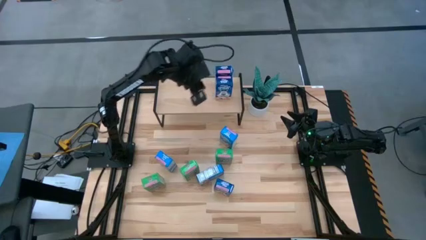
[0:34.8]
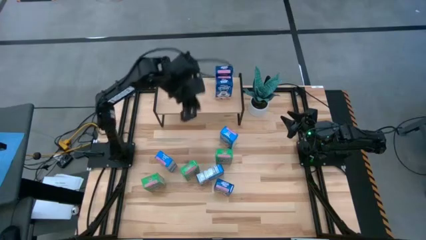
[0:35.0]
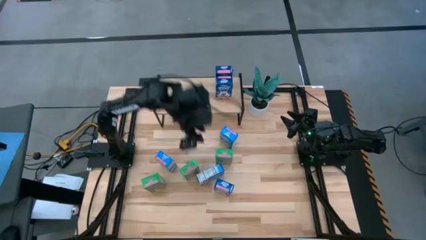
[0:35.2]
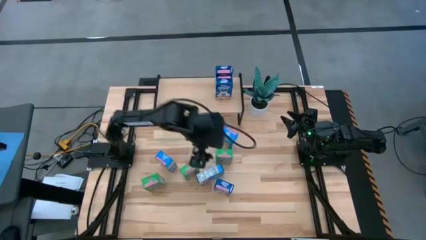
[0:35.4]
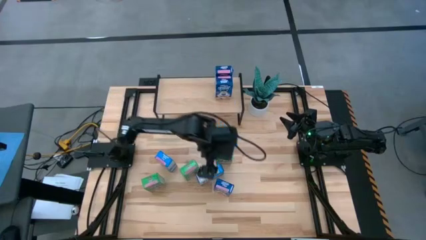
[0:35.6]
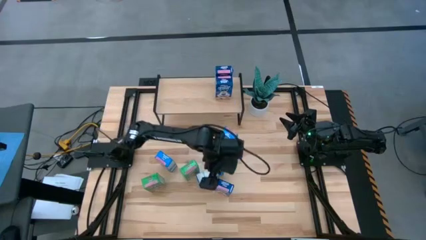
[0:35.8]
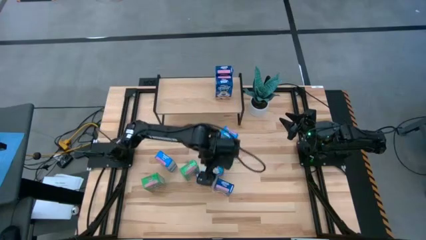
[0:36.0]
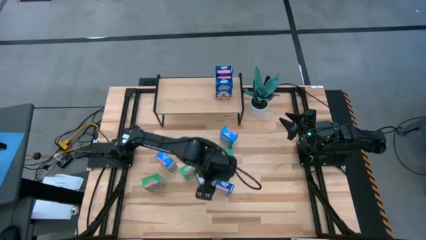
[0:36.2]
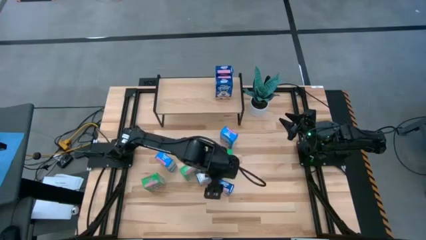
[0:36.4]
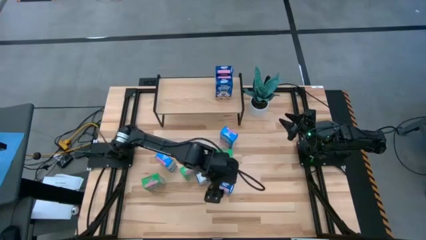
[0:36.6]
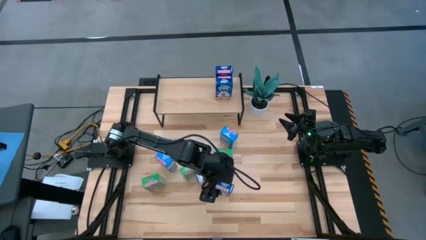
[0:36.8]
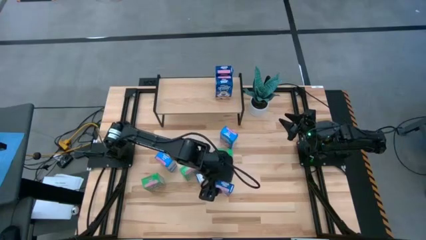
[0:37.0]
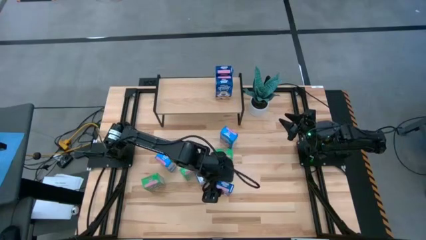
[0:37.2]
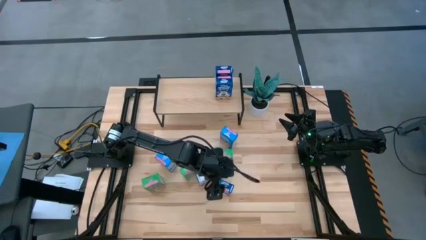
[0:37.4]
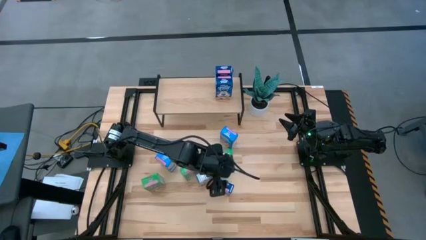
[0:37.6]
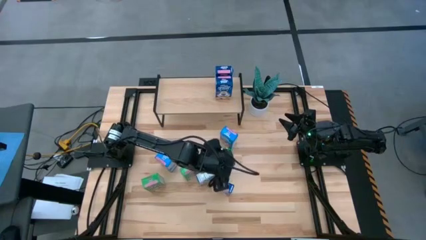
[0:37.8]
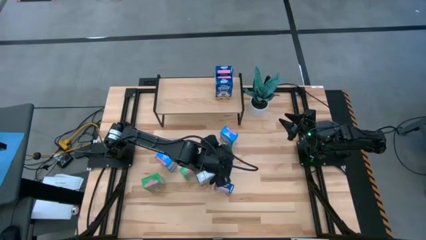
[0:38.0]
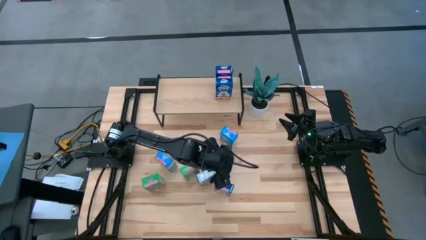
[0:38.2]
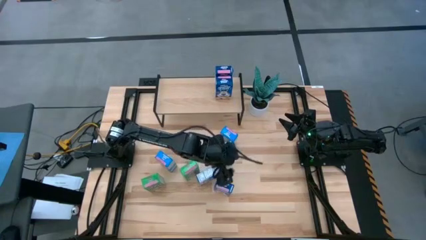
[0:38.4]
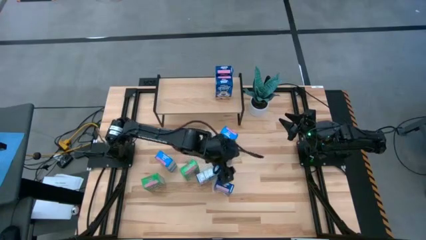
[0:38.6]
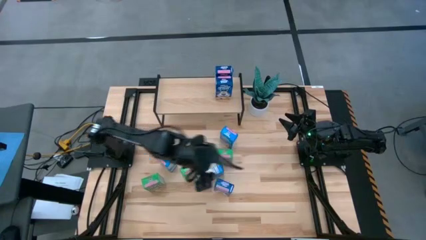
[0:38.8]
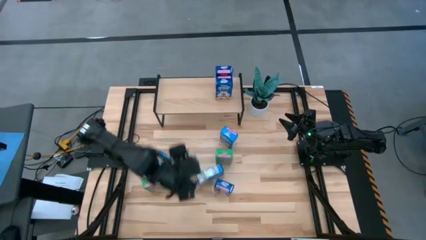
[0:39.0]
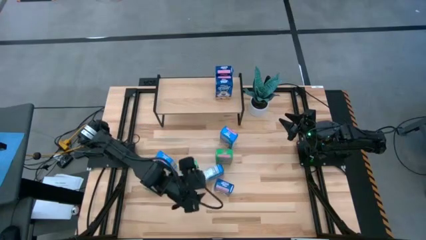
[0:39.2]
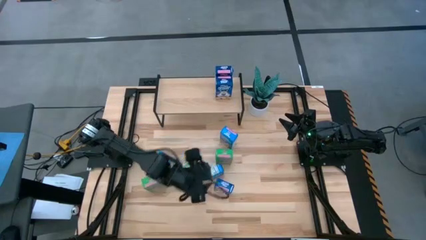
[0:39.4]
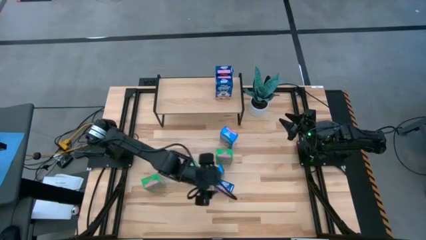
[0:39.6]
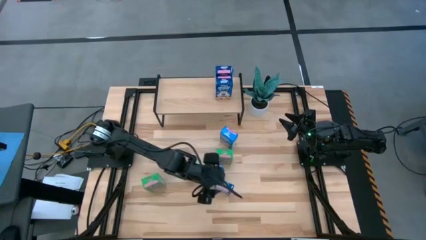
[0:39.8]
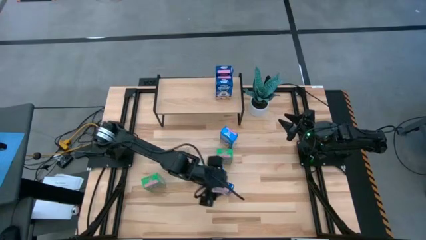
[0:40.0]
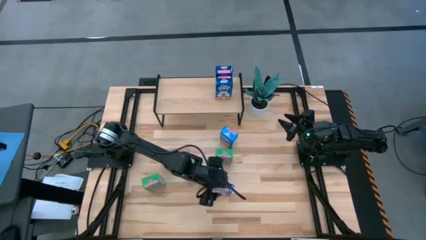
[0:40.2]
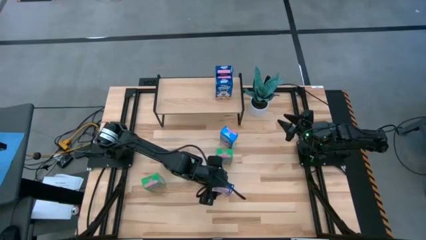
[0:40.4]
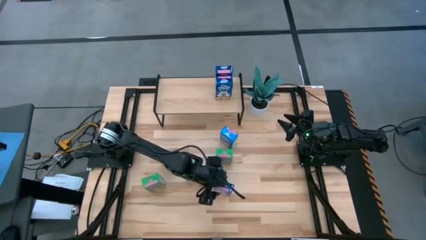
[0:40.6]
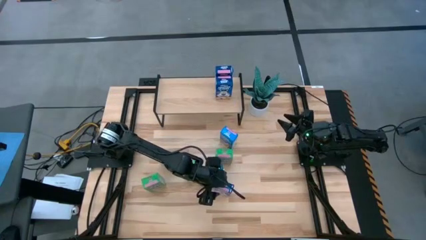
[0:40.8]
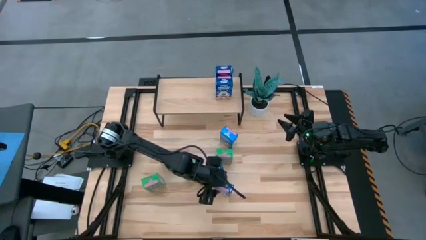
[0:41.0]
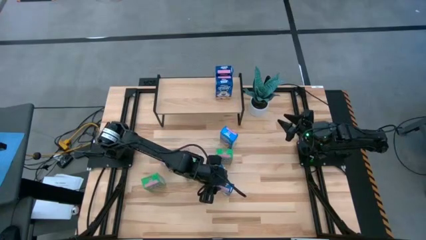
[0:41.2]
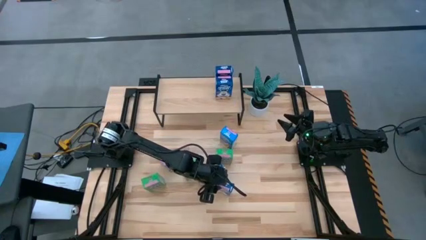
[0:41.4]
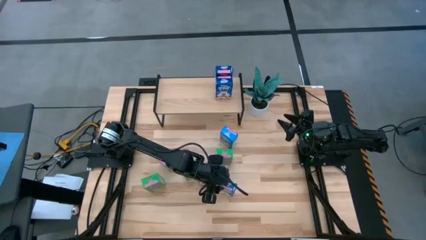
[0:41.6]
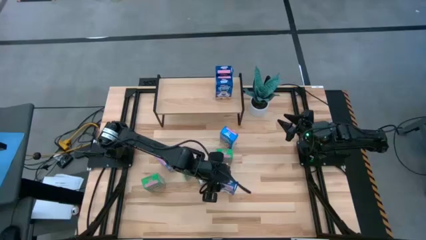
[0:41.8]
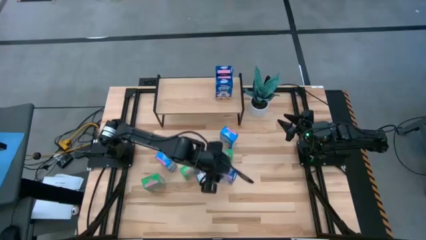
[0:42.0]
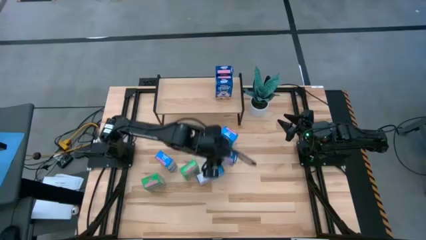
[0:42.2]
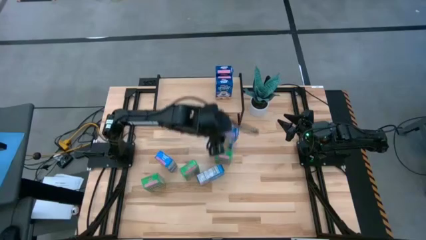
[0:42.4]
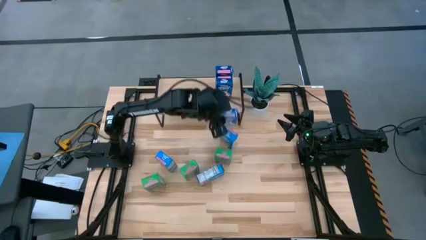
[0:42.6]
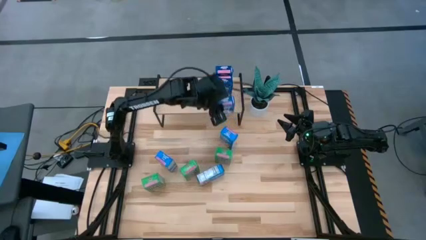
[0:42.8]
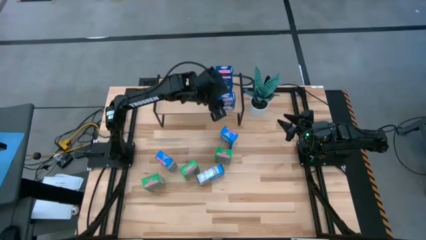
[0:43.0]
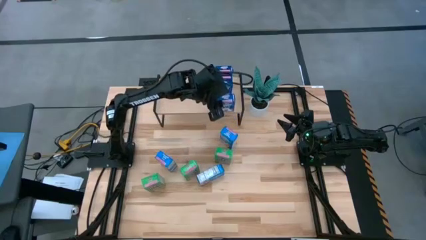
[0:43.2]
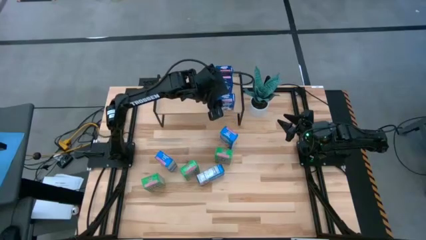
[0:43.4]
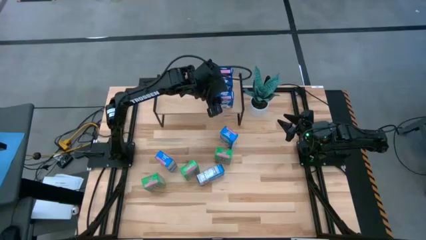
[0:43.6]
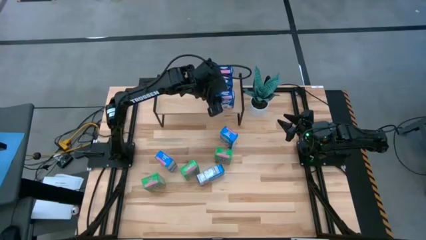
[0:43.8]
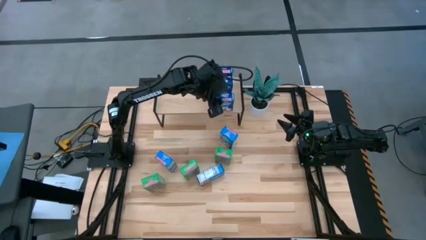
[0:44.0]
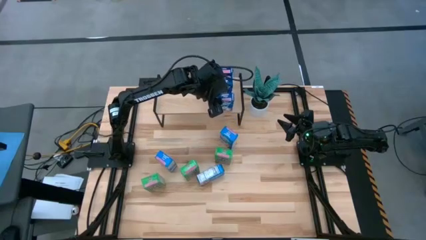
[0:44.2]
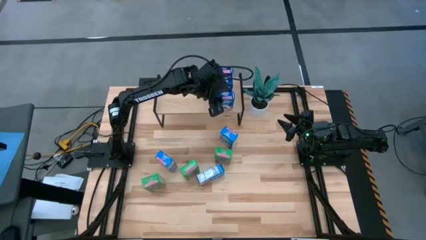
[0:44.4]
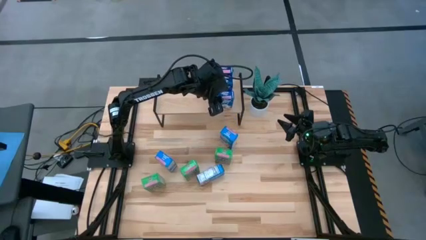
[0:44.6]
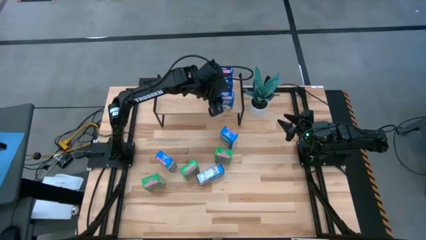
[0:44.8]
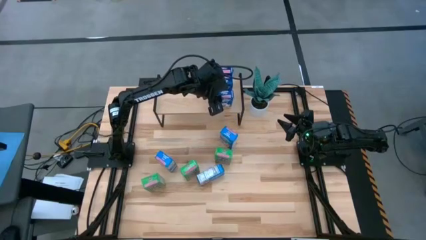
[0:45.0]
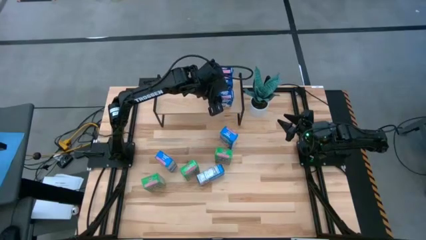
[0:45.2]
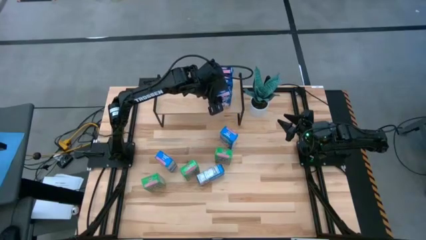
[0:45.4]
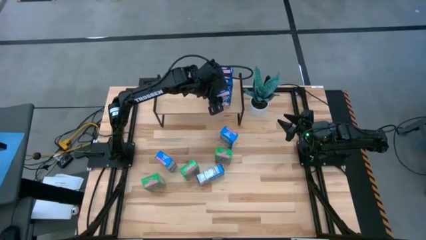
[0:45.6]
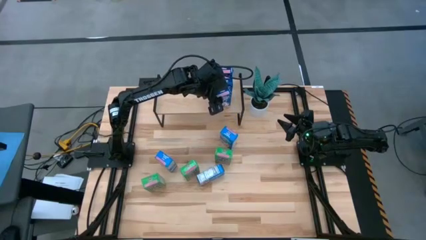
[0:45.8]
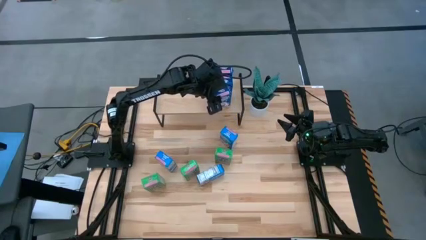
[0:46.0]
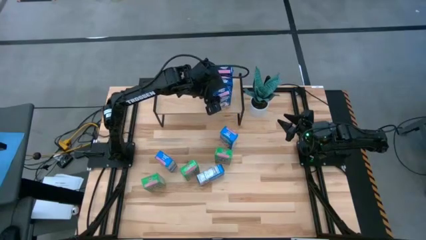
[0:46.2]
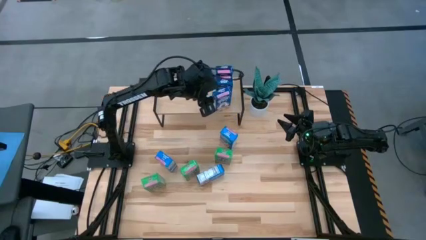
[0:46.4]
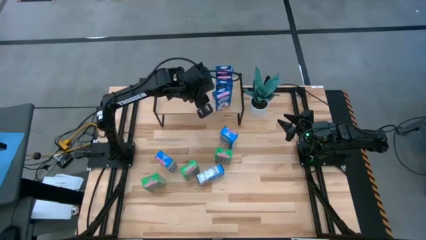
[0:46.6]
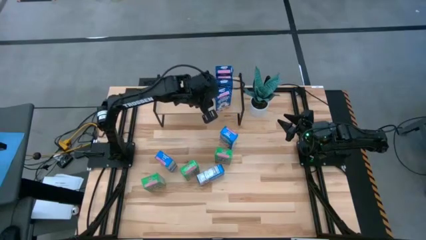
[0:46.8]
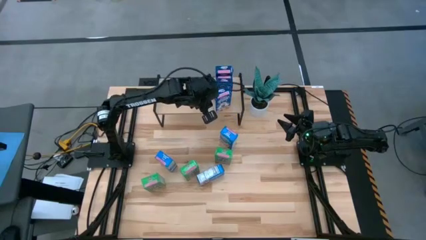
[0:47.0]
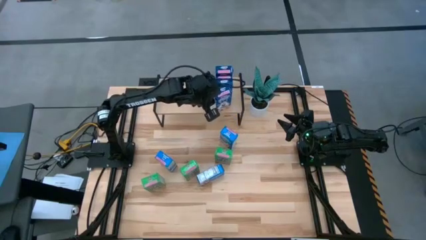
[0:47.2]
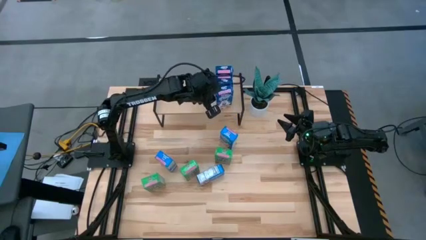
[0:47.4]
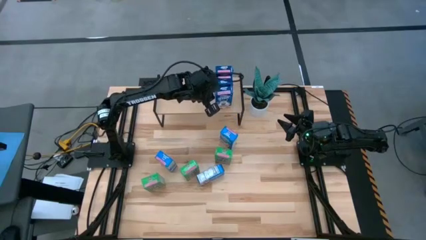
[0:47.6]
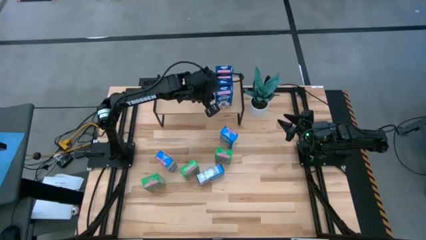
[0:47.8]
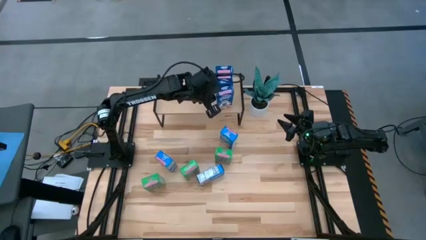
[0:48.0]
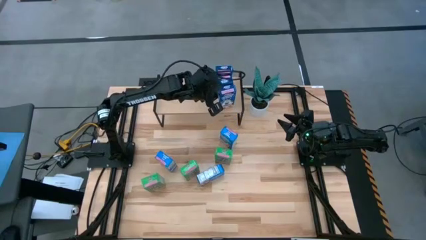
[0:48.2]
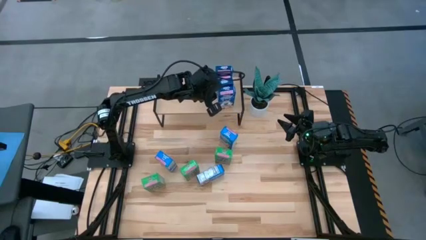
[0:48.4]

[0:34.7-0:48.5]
Task: Stack cereal on shelf
Put the blue cereal box on the shelf aligned with the other blue cereal boxes

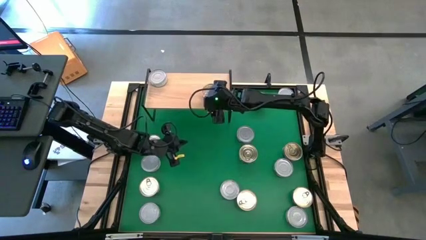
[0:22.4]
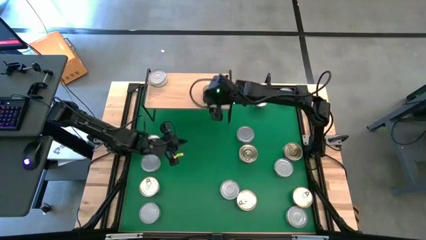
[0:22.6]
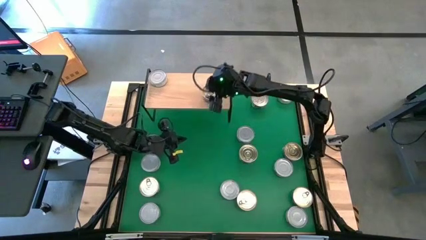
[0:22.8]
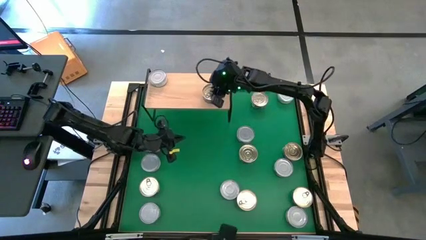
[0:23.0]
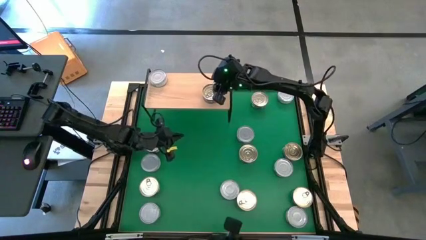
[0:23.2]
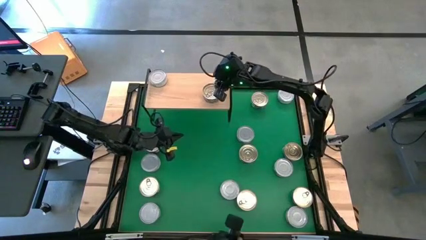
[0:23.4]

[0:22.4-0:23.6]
Task: Stack canned seafood by type on shelf
Put the blue-pink tuna can on the shelf

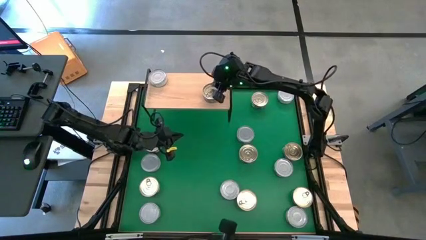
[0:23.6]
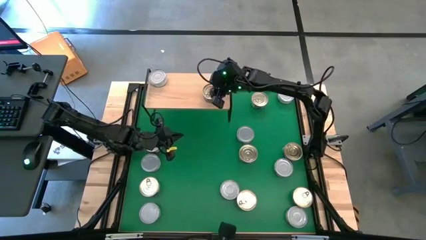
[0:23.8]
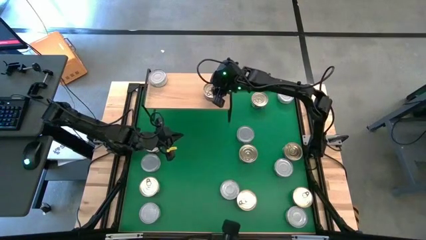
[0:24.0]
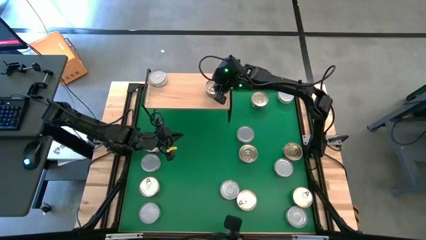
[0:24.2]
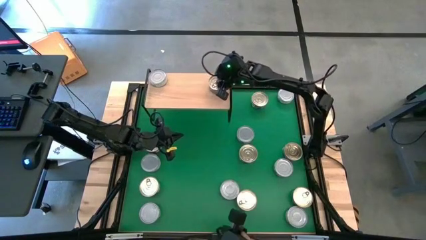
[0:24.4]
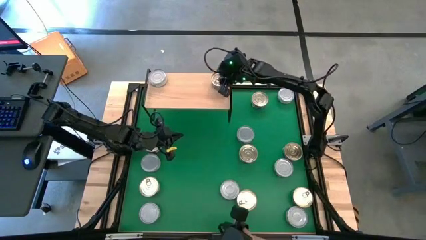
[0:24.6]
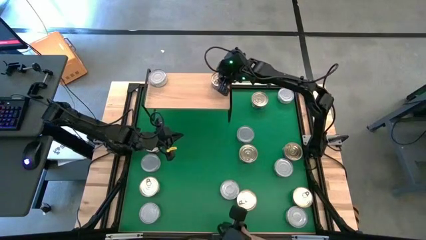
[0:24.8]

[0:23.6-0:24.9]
Put the blue-pink tuna can on the shelf
